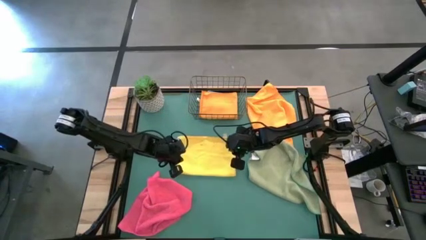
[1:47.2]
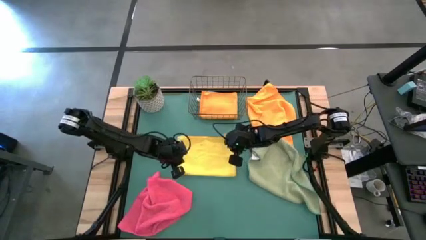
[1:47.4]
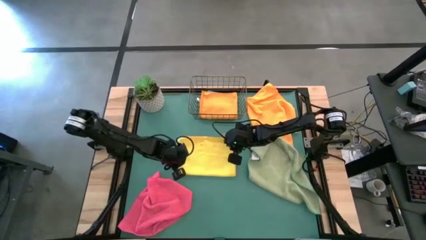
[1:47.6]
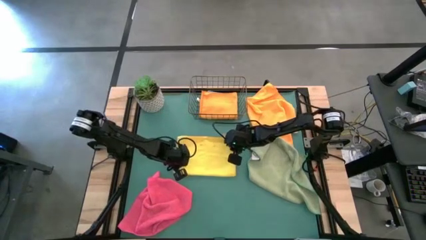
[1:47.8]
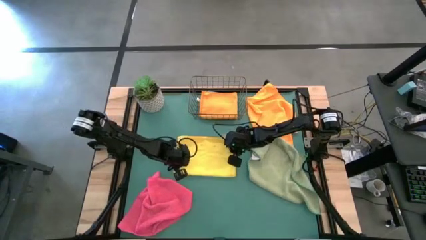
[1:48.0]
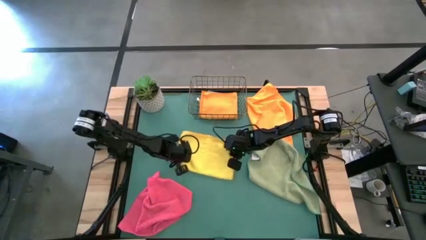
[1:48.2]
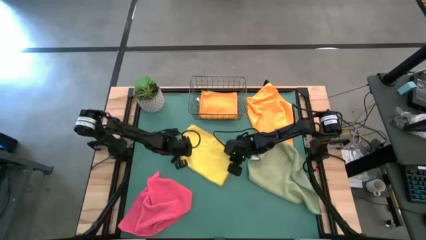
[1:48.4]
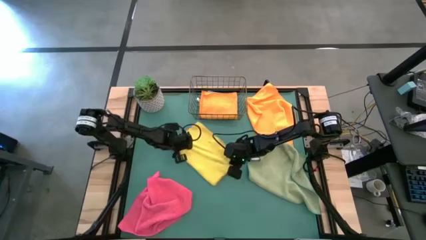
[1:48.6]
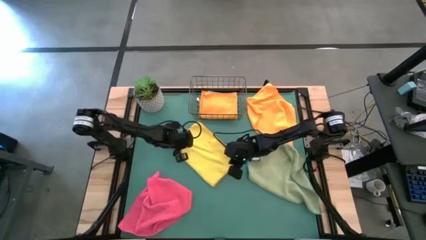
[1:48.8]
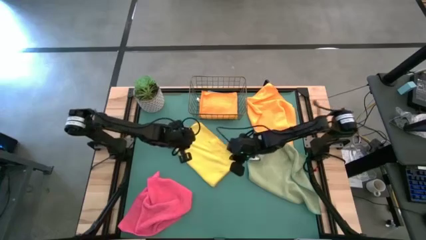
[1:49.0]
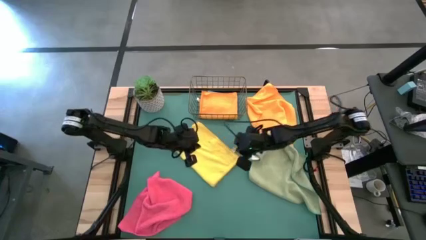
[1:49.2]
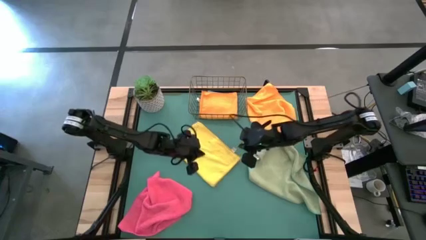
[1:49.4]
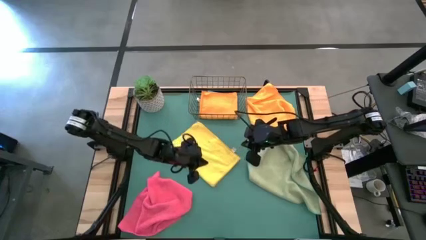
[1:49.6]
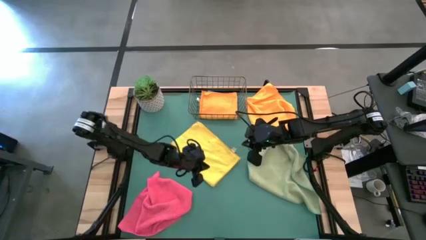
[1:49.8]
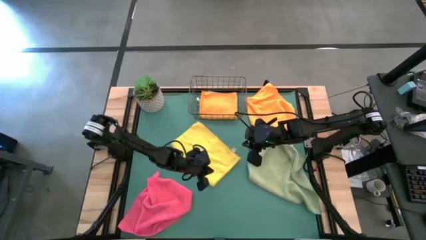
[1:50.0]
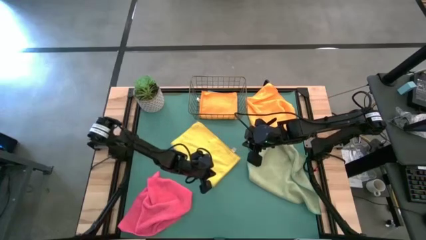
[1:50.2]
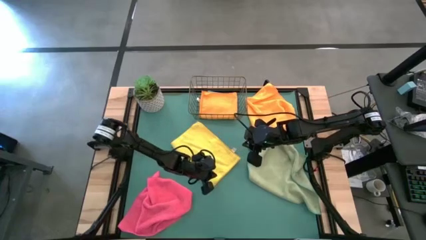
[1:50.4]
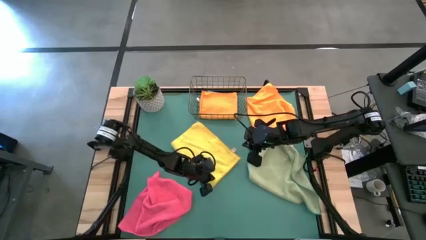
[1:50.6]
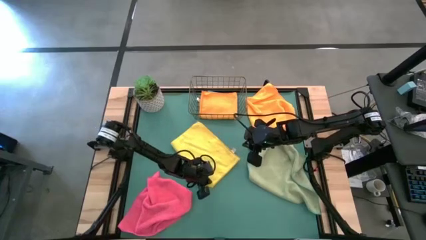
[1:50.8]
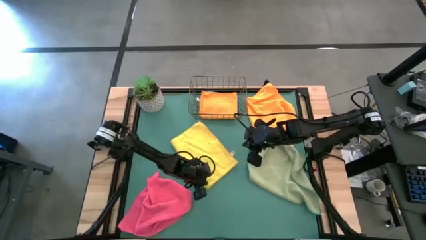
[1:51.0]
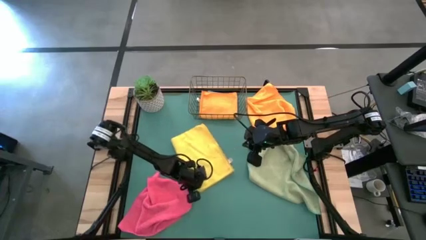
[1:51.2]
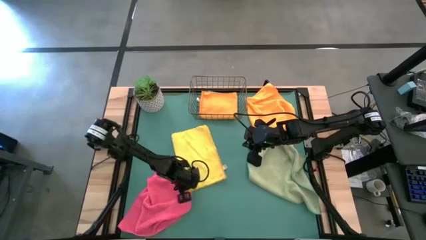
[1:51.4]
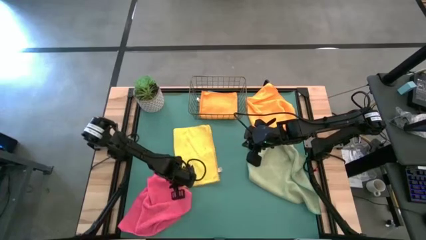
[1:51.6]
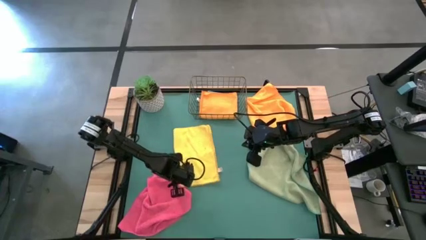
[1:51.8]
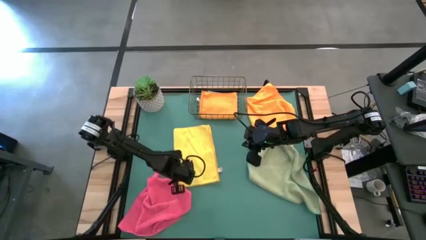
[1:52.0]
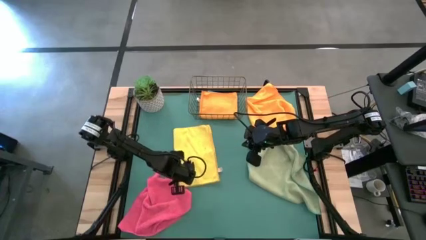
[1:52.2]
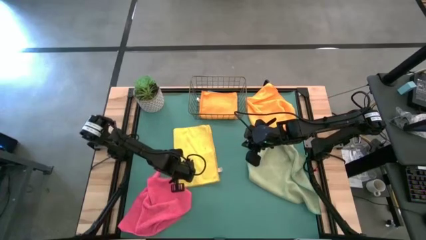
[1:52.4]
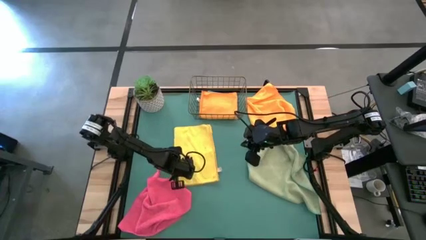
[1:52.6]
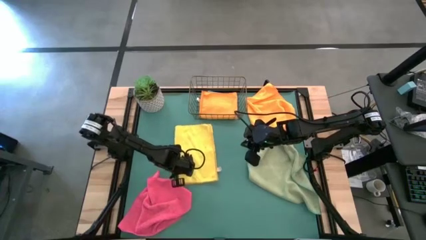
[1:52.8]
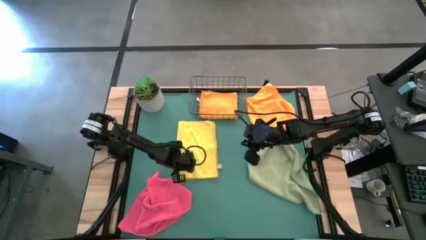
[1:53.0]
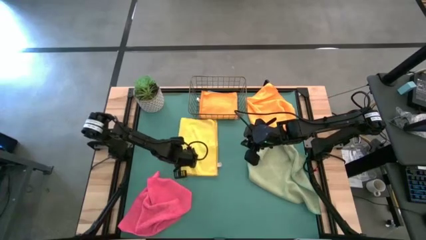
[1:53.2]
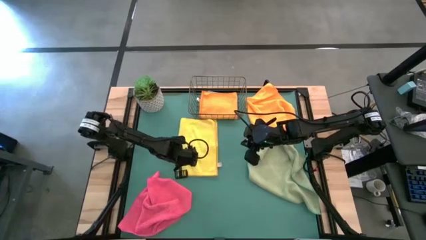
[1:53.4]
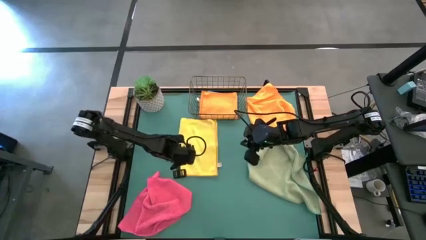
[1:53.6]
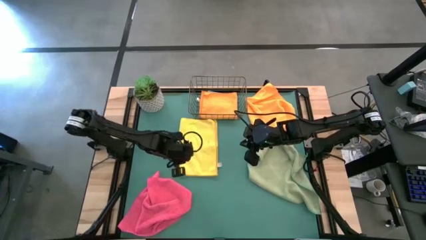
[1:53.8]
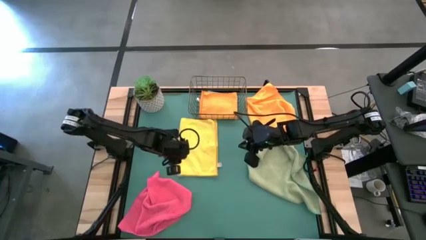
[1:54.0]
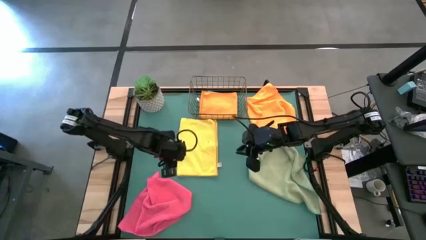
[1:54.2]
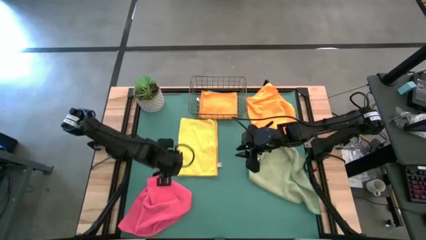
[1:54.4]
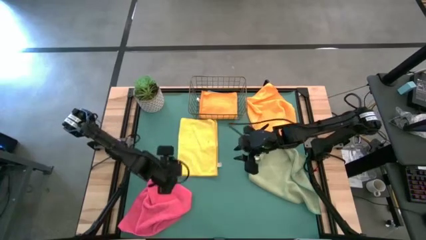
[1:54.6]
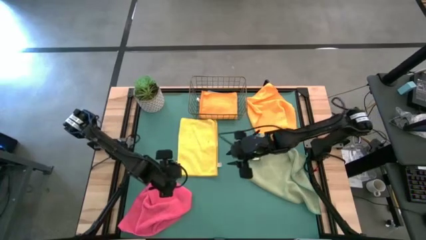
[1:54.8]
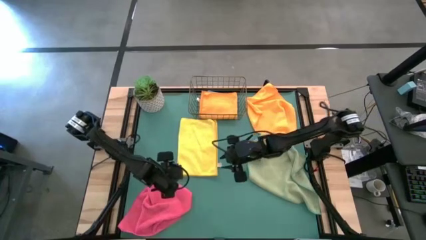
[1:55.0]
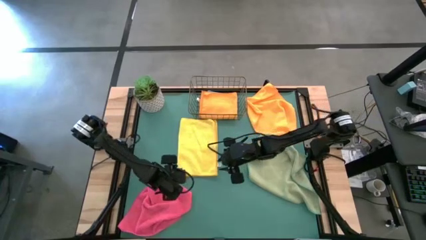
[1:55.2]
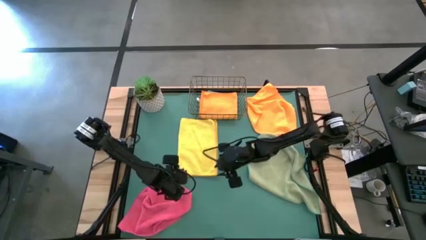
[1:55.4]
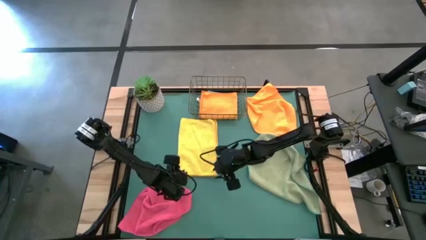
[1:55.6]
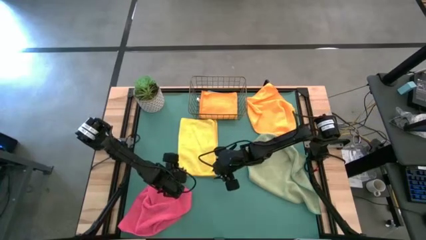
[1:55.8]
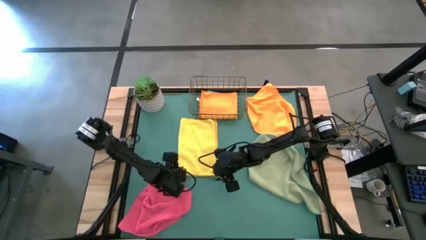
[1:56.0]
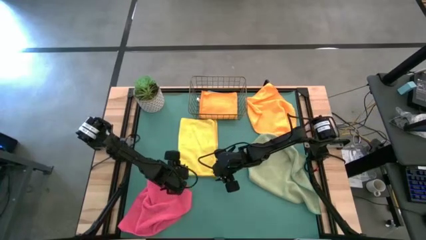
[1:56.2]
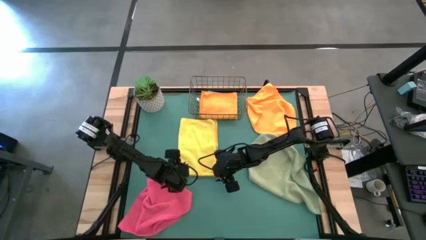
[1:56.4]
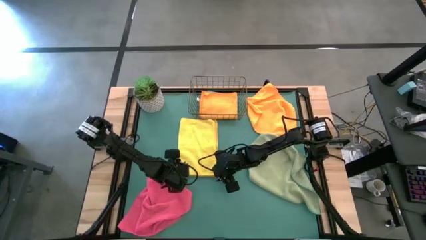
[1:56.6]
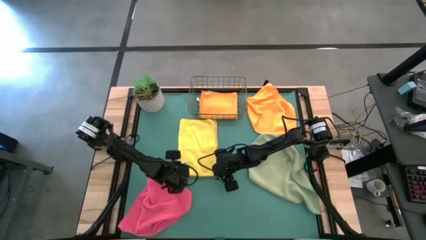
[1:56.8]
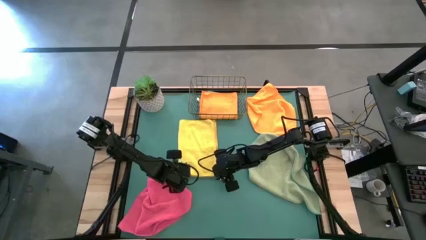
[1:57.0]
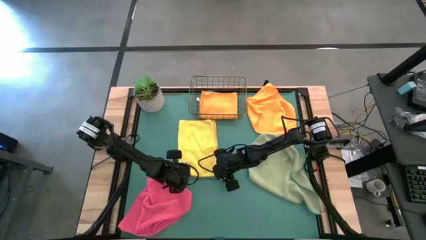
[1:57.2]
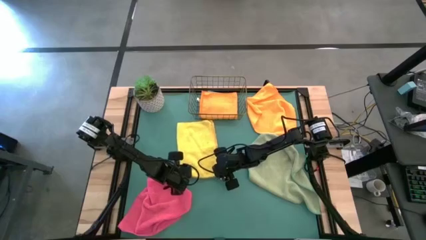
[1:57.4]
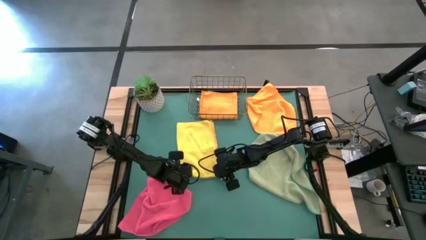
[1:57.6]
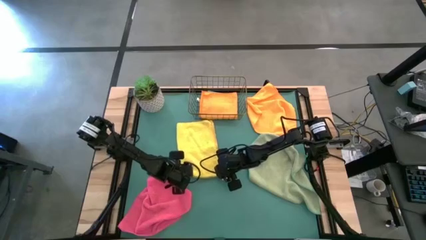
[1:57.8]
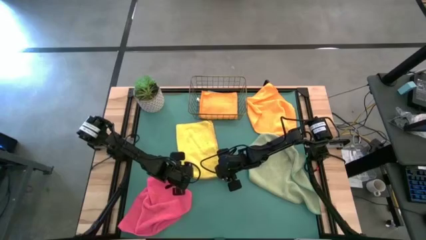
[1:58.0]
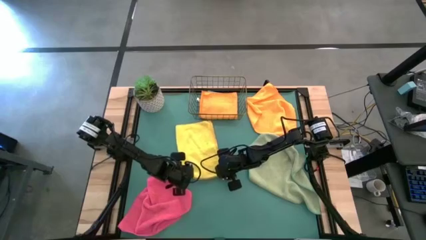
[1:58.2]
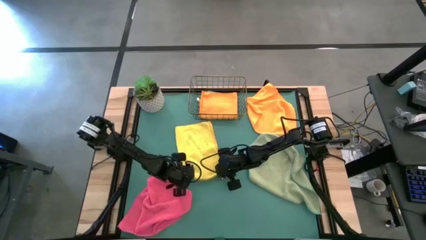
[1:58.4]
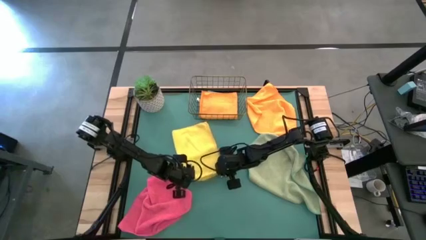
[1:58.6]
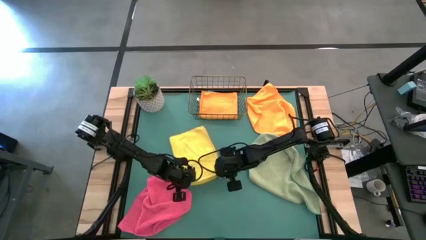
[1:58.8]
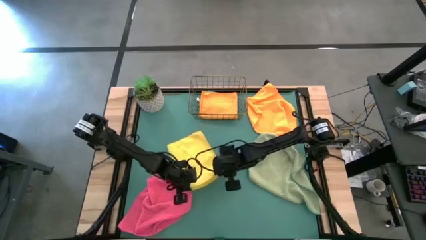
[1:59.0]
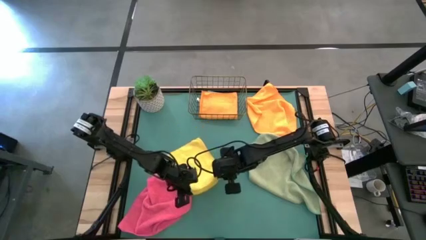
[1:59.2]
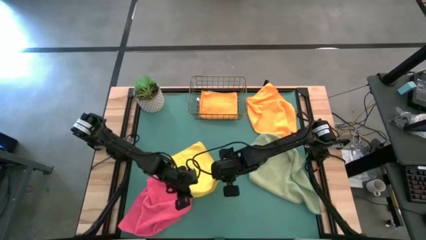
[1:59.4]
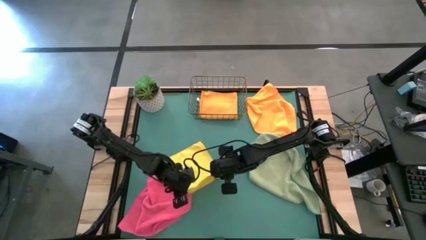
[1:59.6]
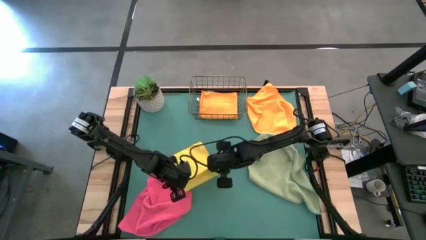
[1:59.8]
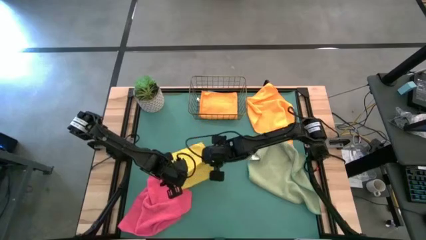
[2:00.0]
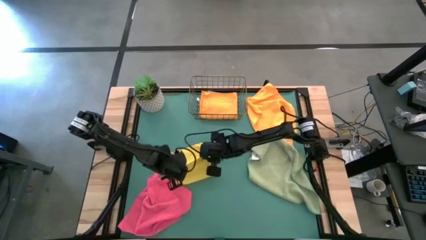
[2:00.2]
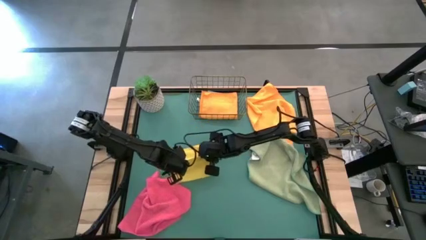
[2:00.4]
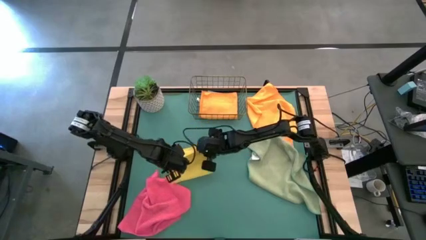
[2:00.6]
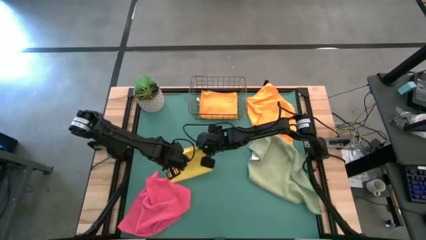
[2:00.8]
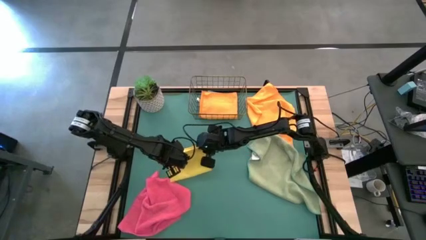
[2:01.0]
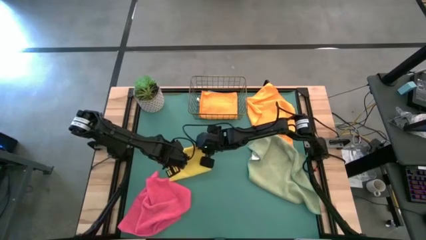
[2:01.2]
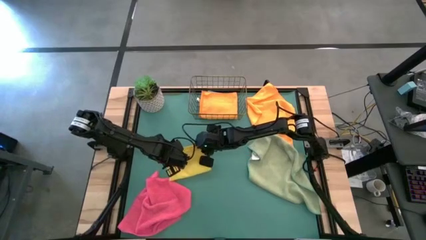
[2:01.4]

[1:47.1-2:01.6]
Task: Fold microfiber towels
Fold the yellow microfiber cloth
